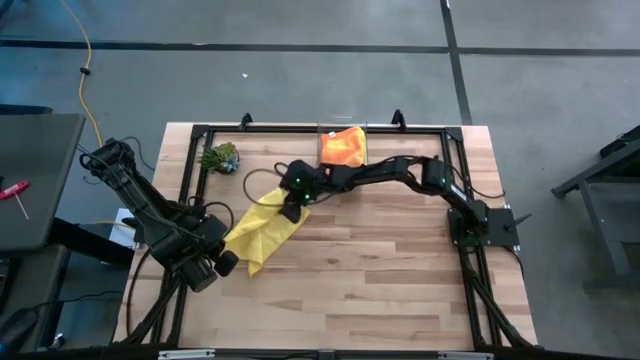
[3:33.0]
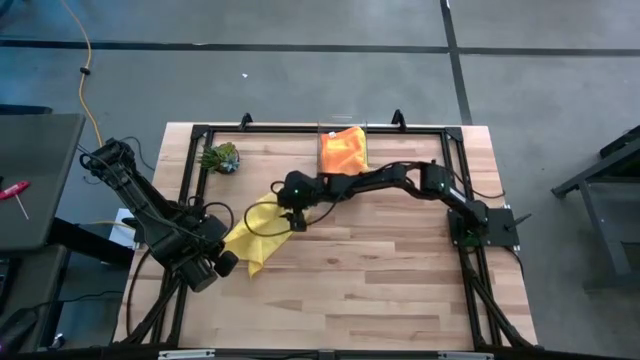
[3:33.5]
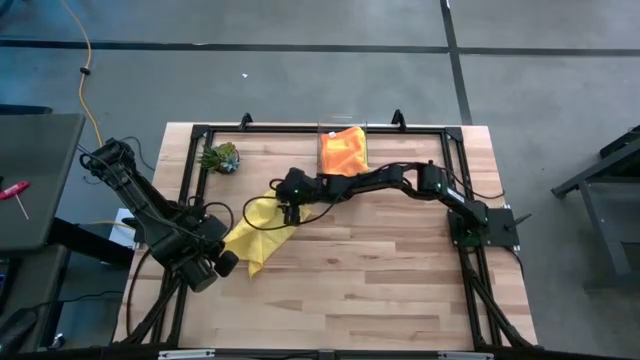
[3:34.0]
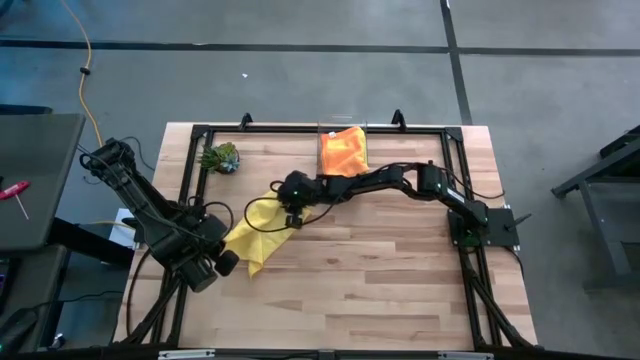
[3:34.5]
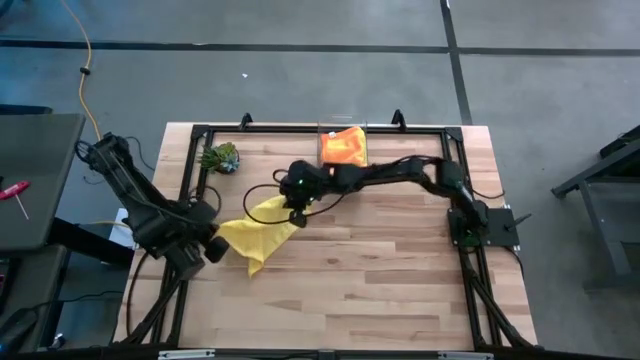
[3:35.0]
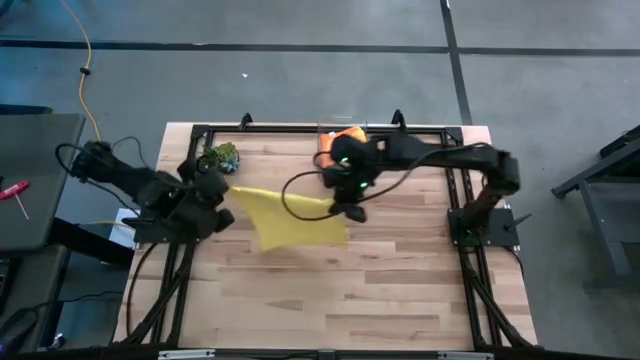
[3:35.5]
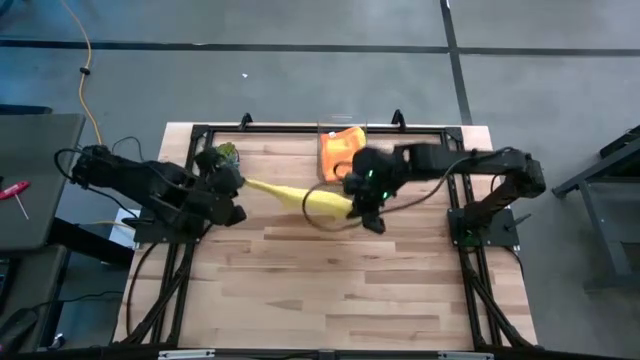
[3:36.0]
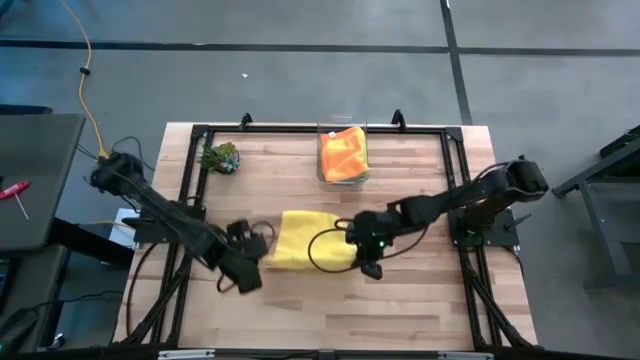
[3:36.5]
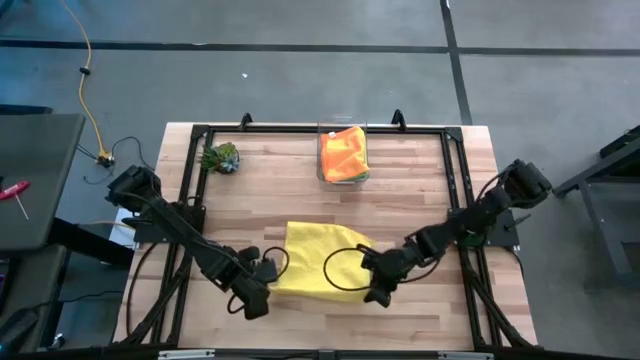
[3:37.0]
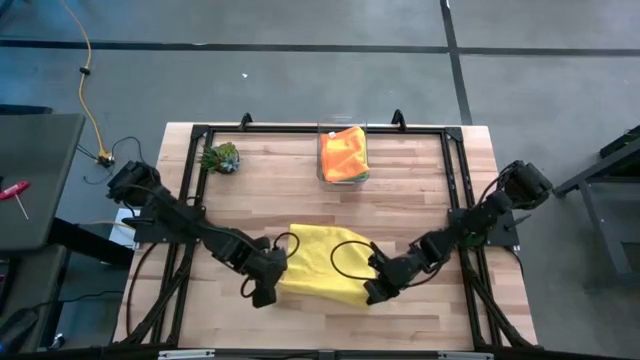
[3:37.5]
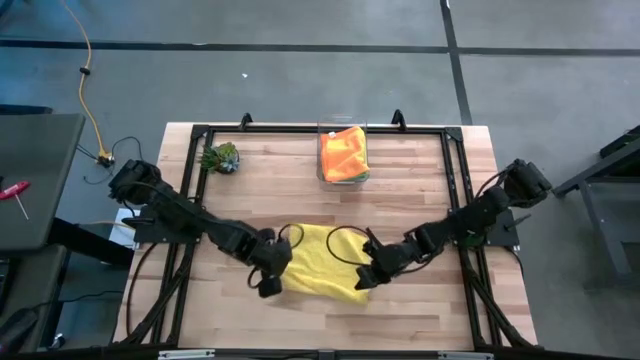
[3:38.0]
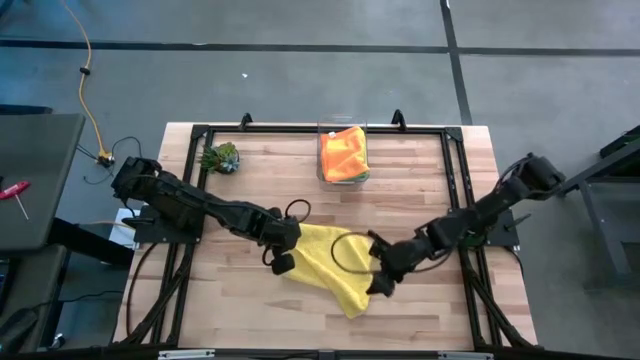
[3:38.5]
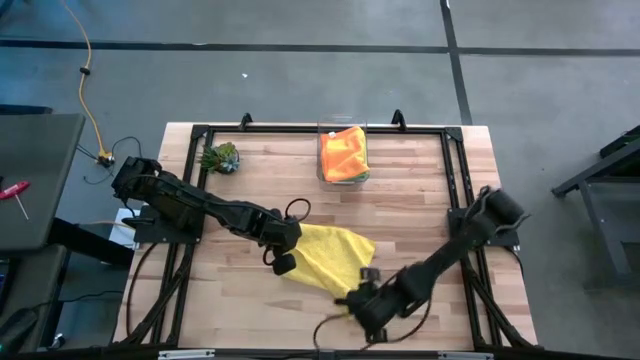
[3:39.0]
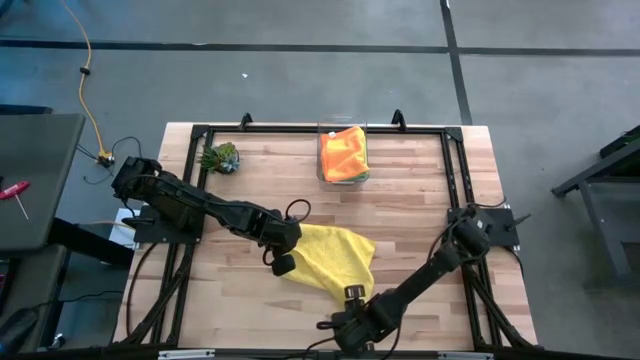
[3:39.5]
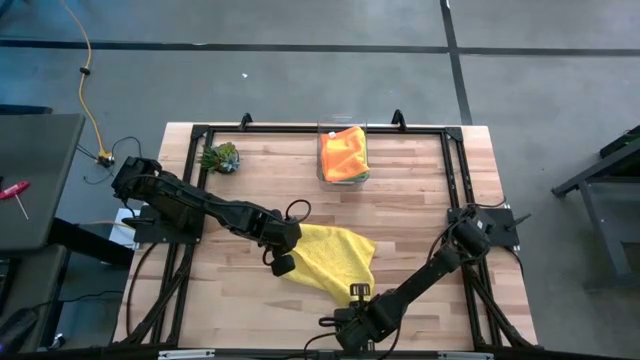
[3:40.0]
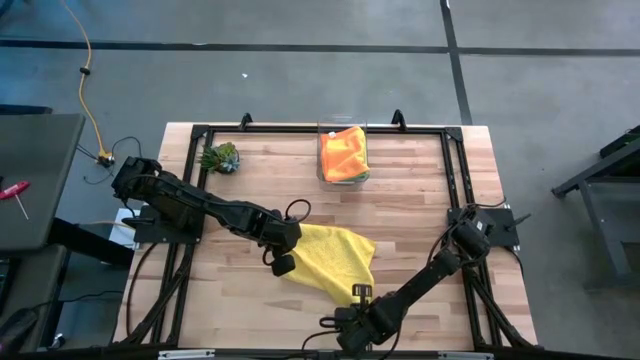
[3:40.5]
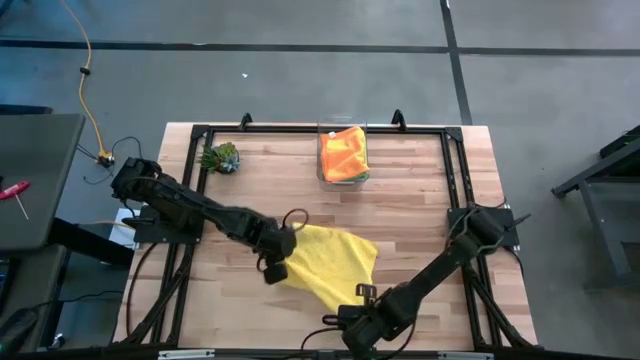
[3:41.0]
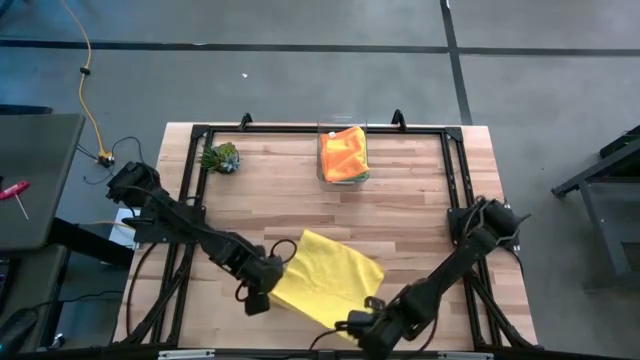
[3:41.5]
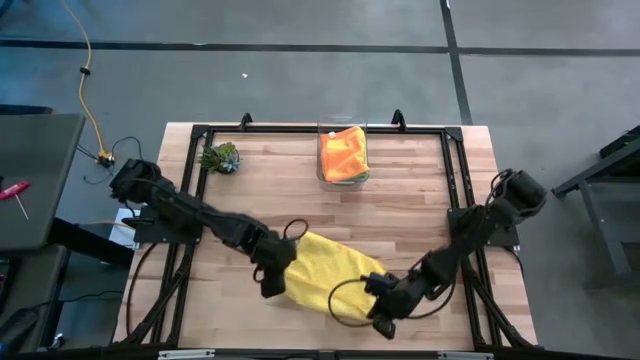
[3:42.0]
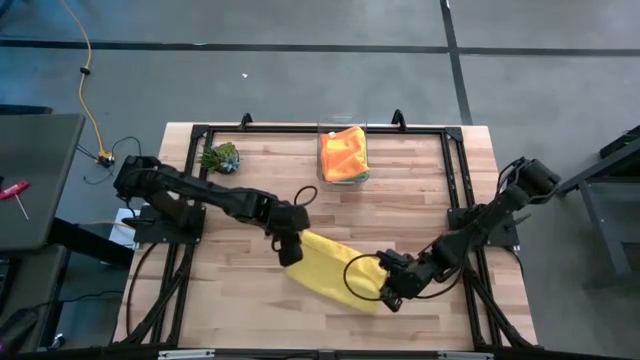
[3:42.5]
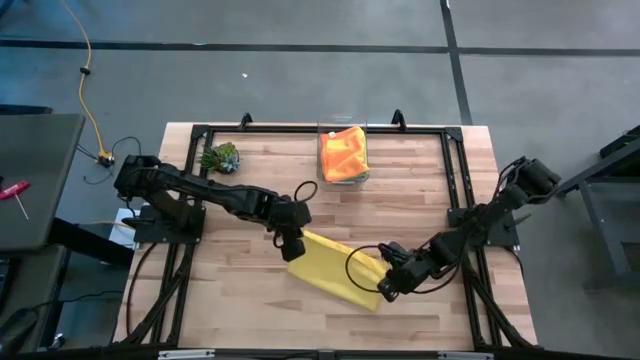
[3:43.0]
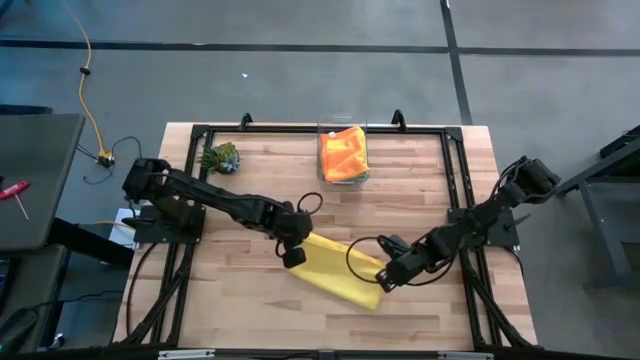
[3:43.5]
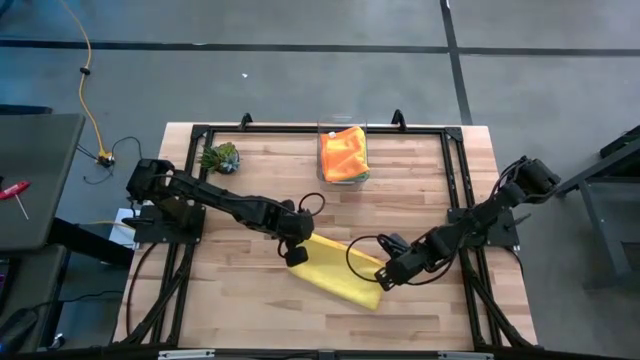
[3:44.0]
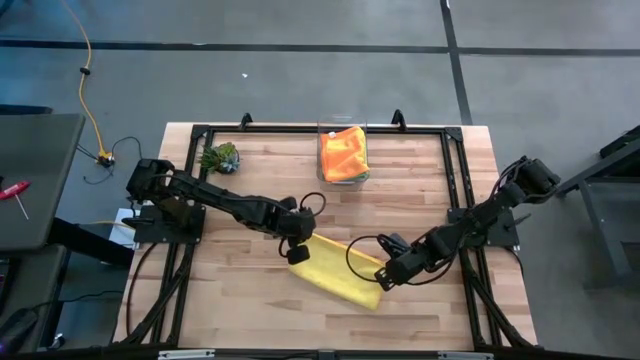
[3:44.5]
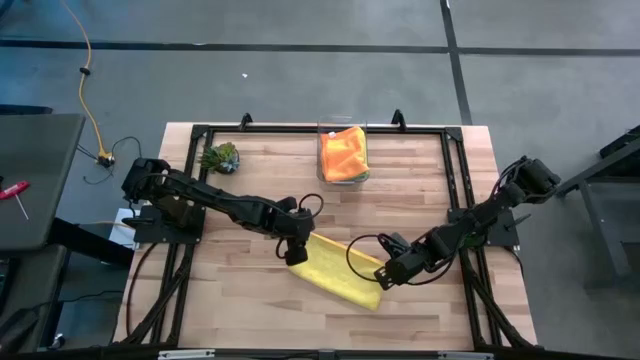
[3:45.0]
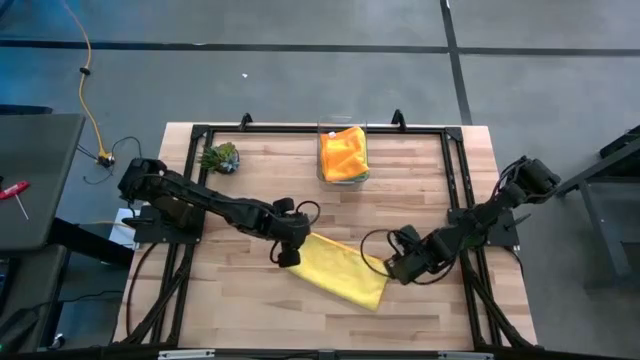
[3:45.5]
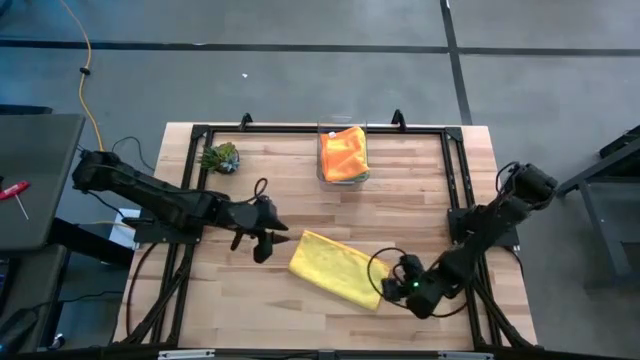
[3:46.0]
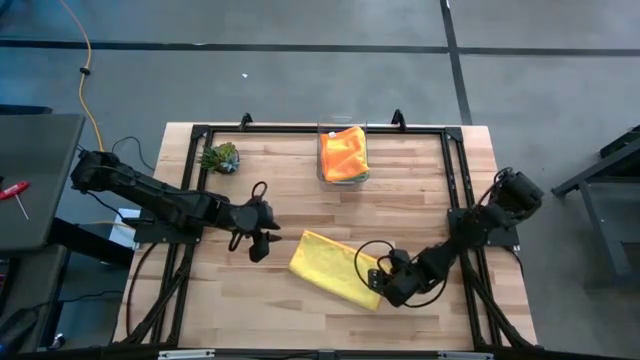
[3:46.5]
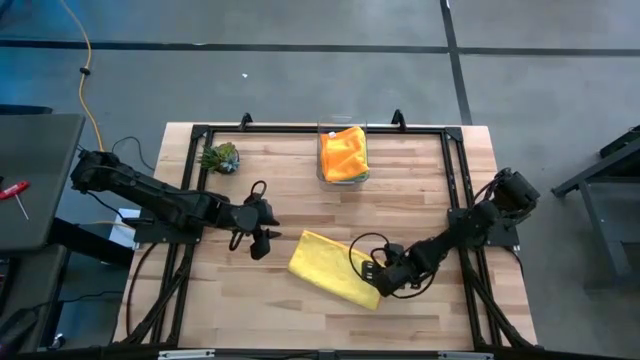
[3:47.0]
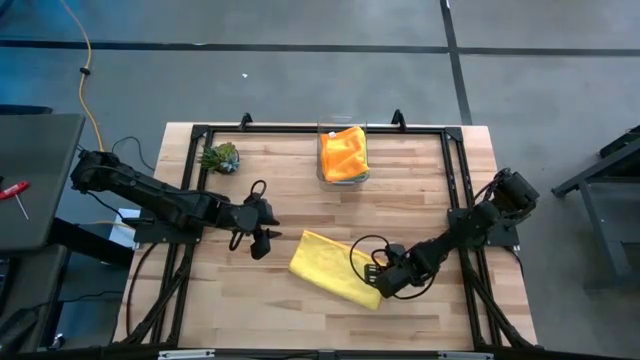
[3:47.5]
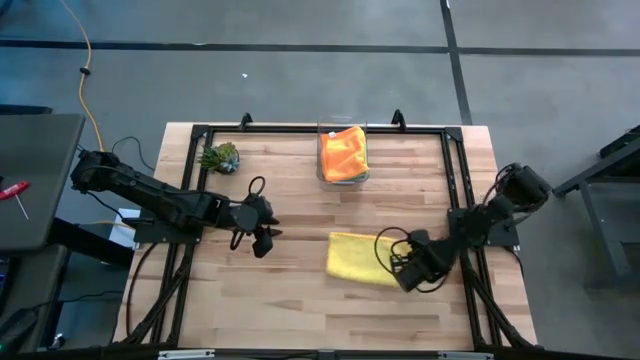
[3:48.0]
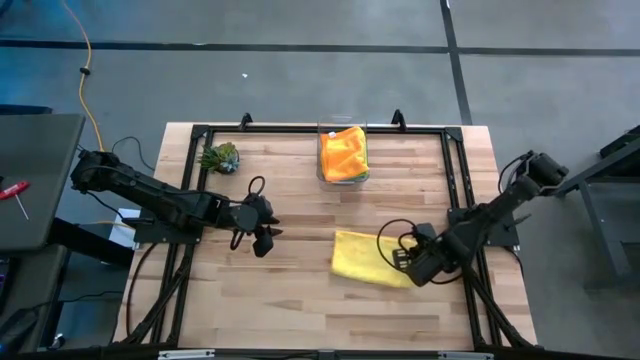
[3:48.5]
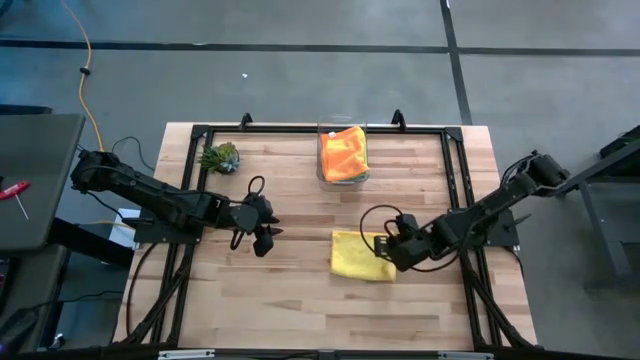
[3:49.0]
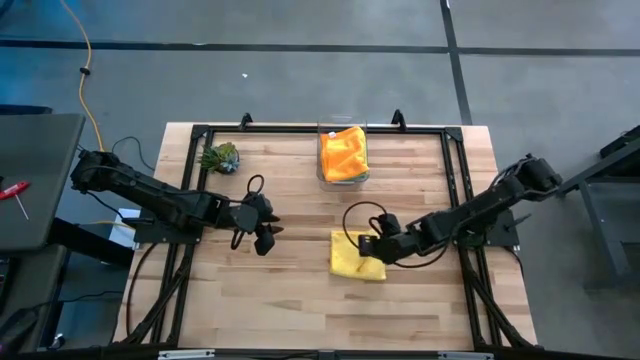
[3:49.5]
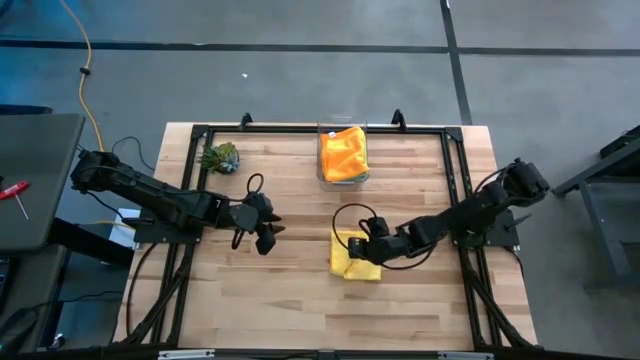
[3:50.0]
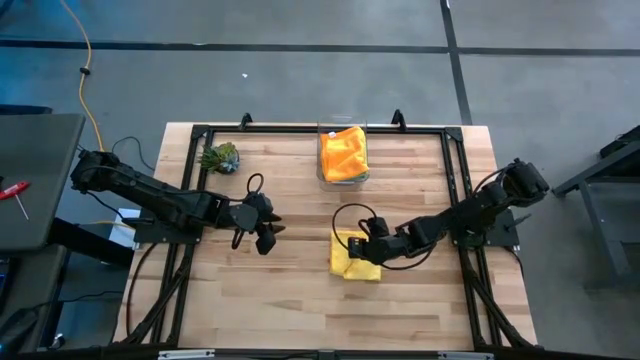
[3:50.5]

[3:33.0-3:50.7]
Task: Fold microfiber towels
Fold the yellow microfiber cloth

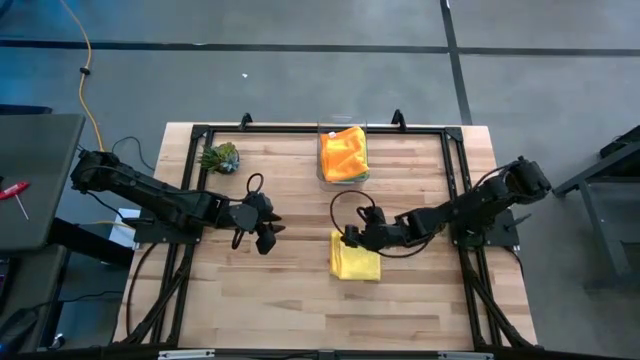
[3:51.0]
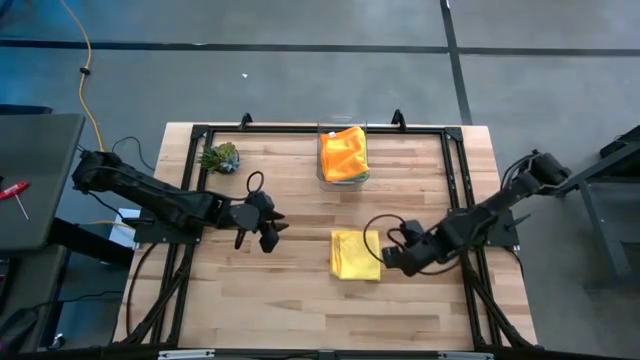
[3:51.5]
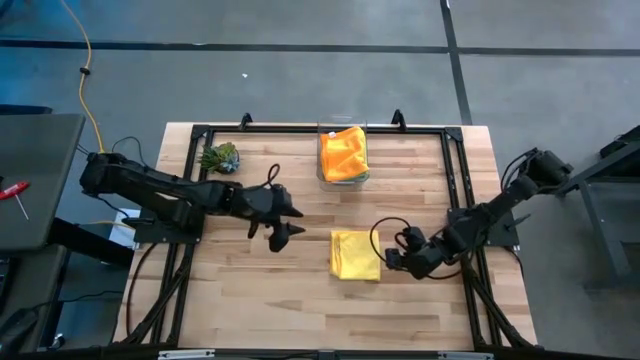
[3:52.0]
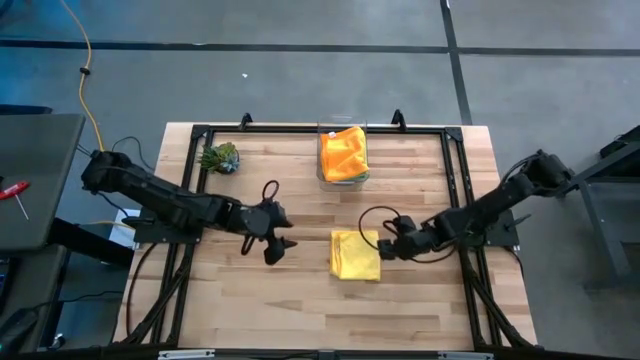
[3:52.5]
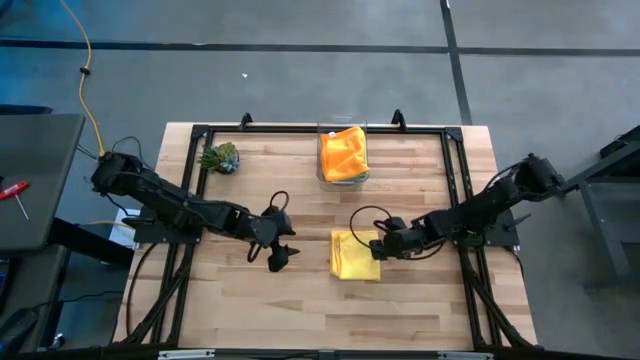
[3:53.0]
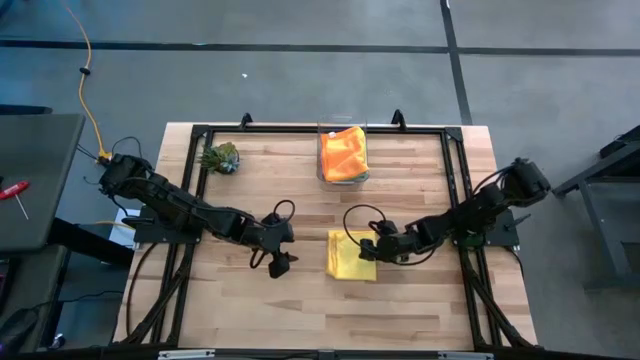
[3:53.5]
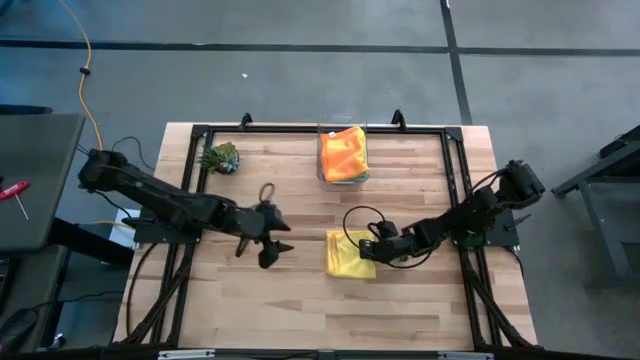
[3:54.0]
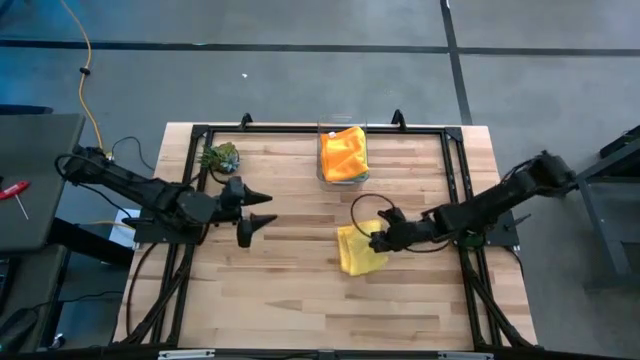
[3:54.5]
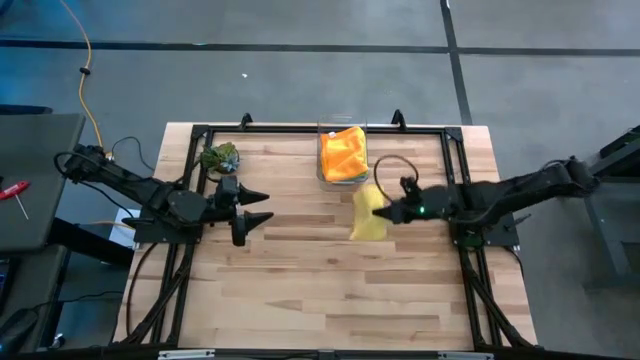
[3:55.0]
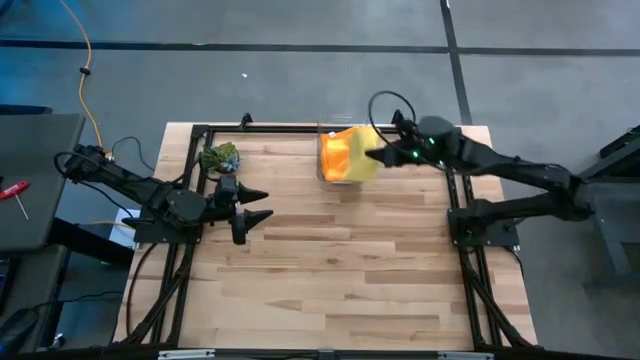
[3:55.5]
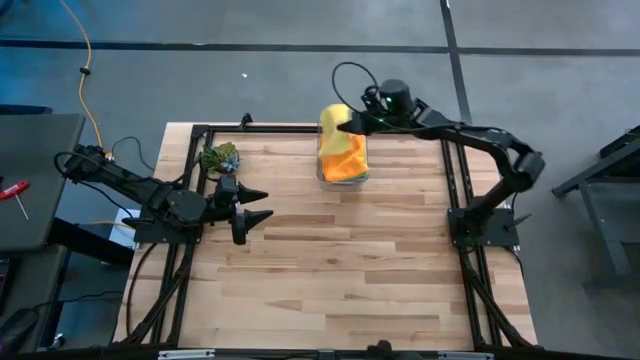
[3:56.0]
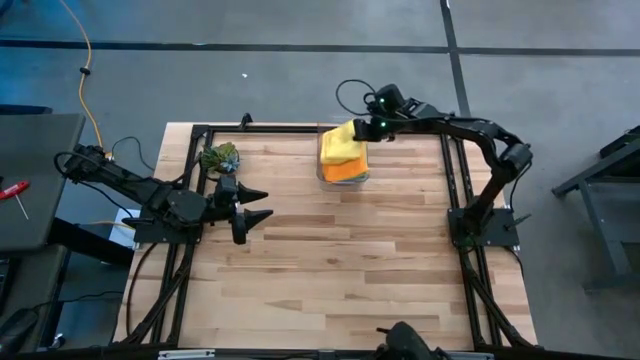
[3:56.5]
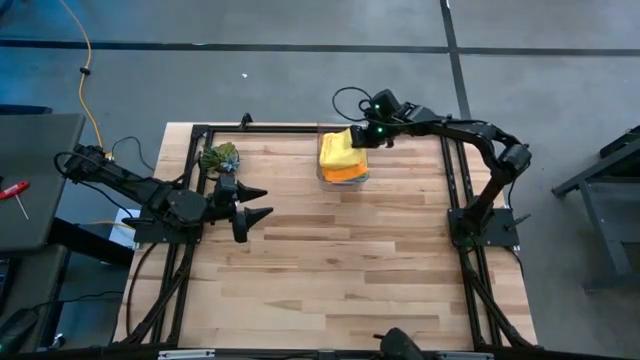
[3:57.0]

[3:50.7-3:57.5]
Put the yellow microfiber cloth into the transparent bin
